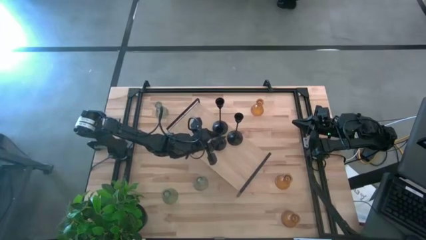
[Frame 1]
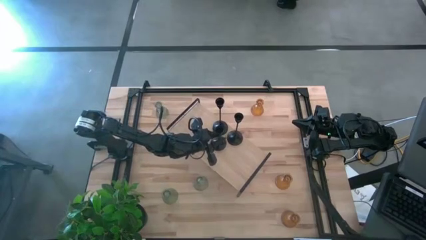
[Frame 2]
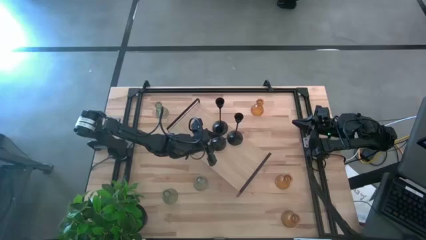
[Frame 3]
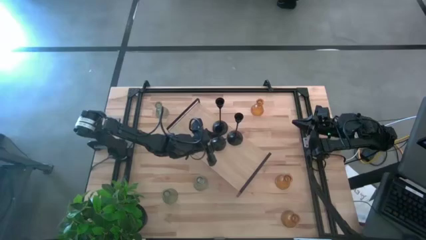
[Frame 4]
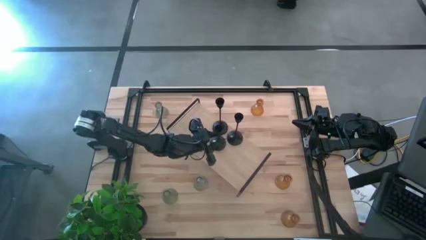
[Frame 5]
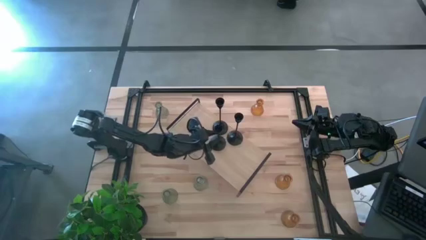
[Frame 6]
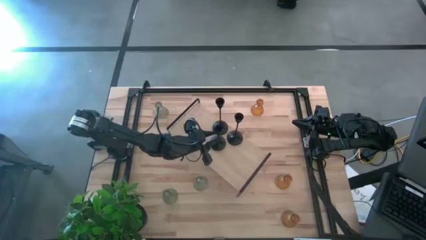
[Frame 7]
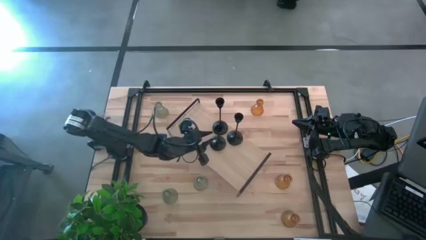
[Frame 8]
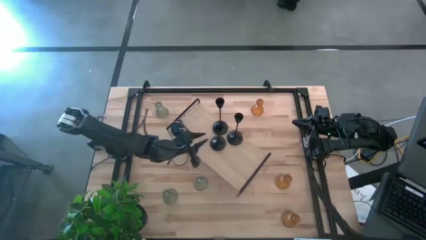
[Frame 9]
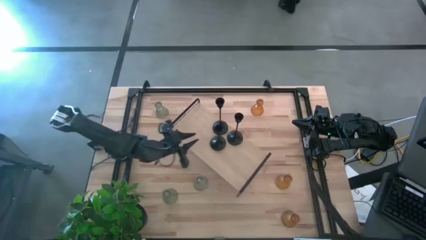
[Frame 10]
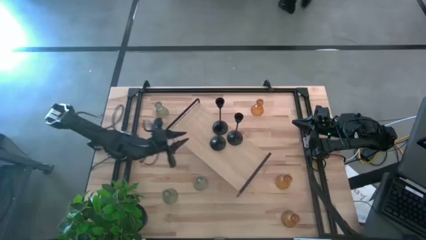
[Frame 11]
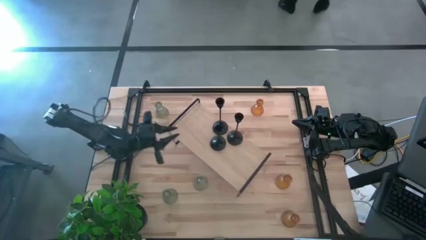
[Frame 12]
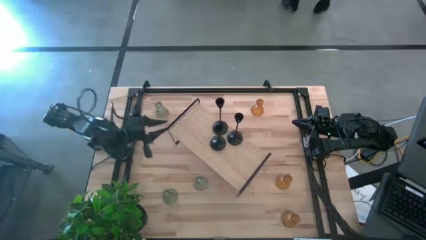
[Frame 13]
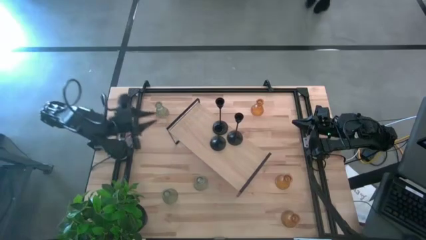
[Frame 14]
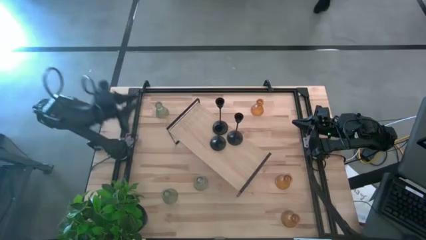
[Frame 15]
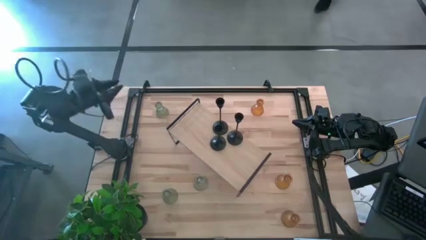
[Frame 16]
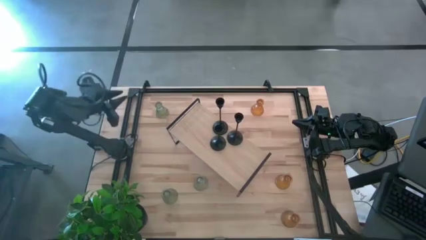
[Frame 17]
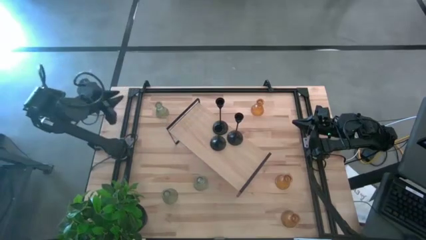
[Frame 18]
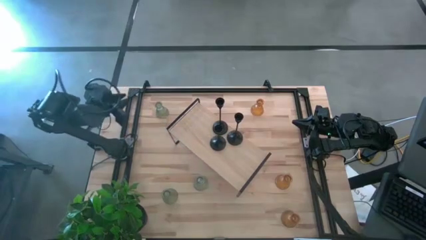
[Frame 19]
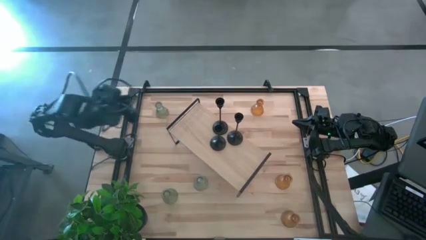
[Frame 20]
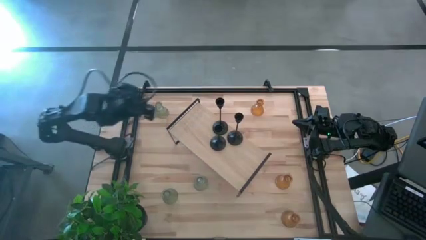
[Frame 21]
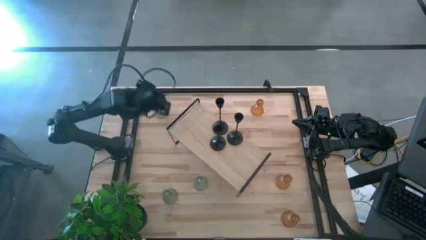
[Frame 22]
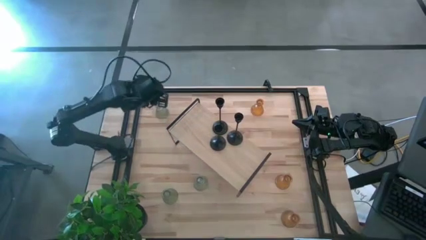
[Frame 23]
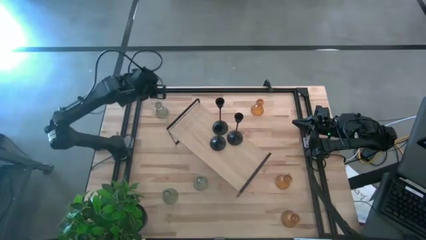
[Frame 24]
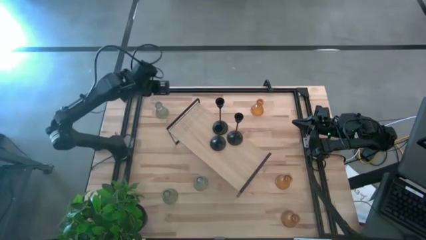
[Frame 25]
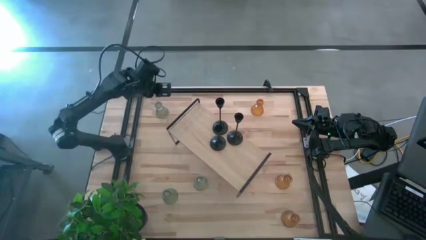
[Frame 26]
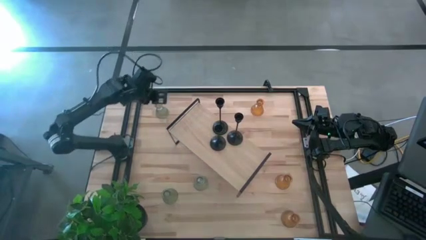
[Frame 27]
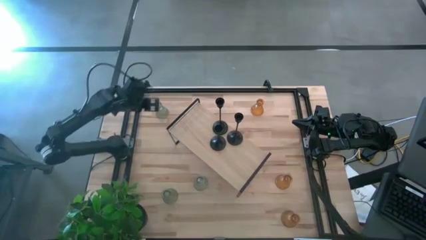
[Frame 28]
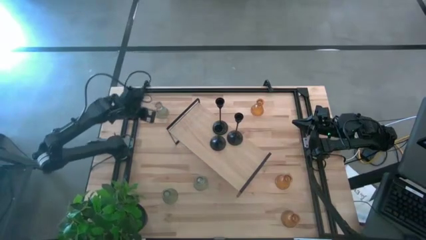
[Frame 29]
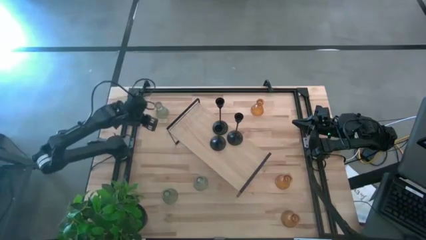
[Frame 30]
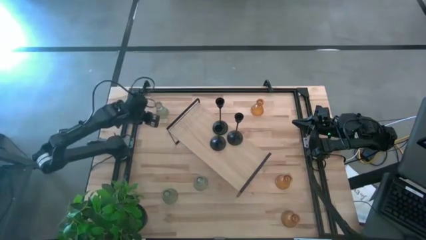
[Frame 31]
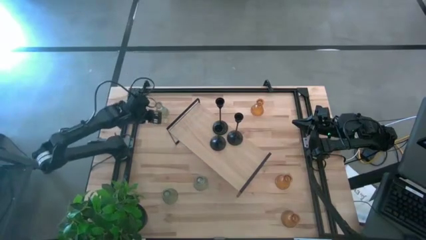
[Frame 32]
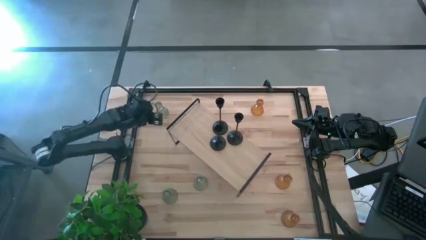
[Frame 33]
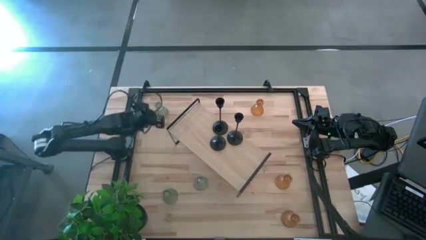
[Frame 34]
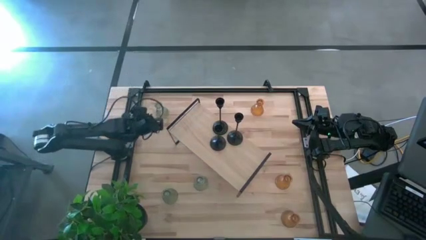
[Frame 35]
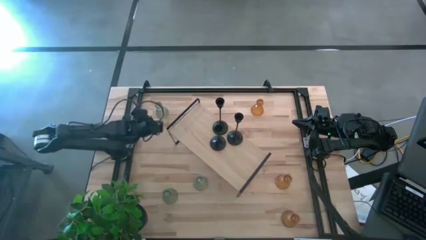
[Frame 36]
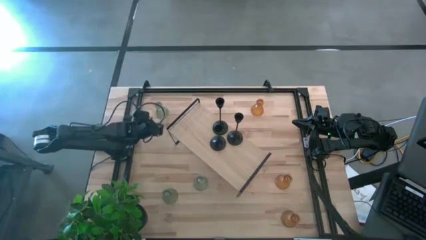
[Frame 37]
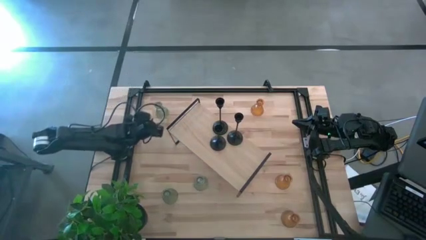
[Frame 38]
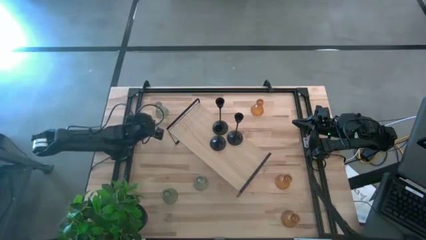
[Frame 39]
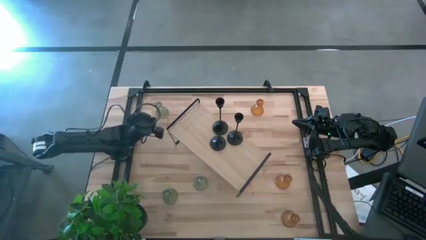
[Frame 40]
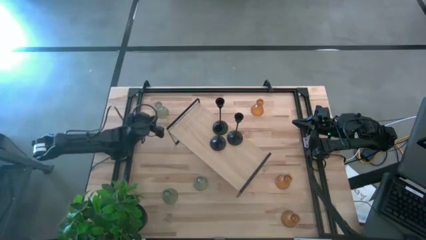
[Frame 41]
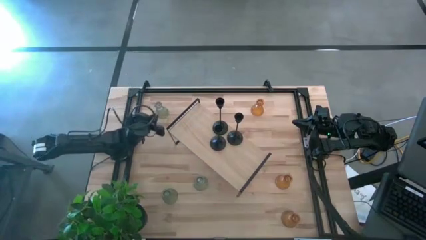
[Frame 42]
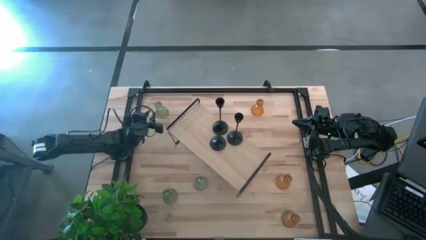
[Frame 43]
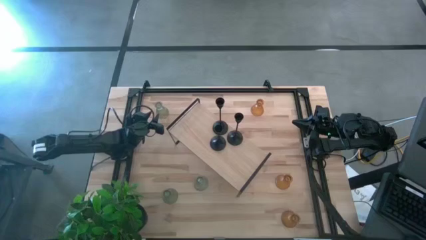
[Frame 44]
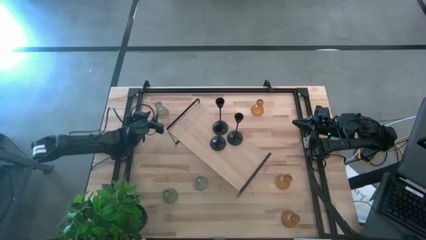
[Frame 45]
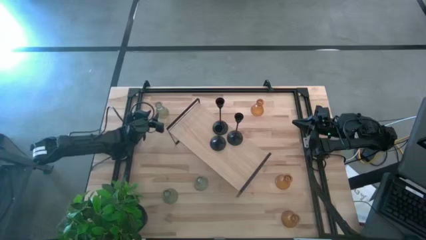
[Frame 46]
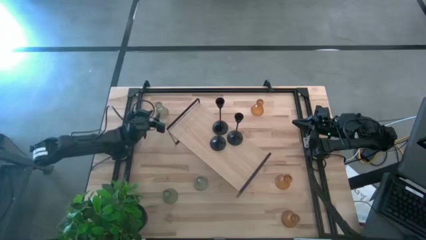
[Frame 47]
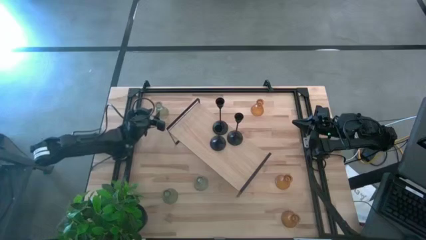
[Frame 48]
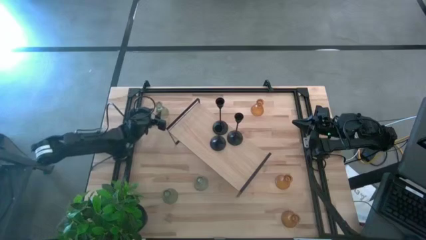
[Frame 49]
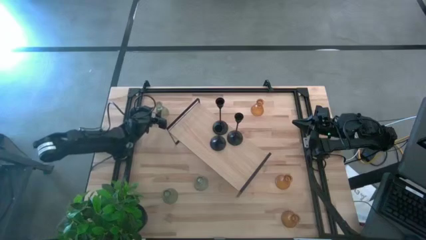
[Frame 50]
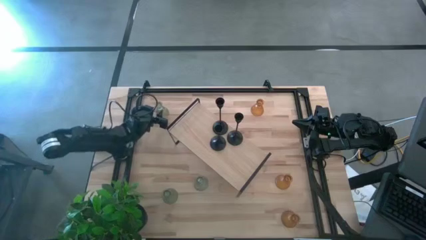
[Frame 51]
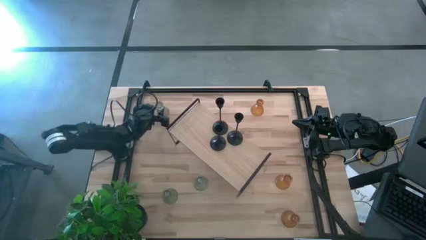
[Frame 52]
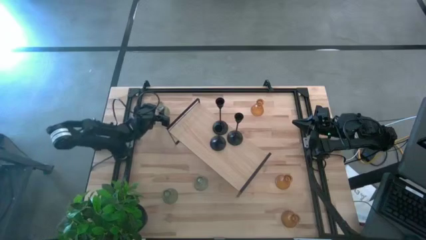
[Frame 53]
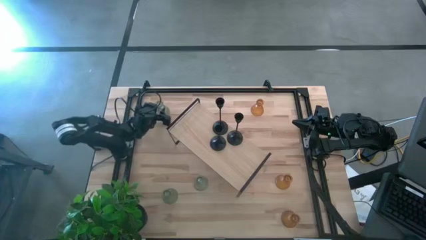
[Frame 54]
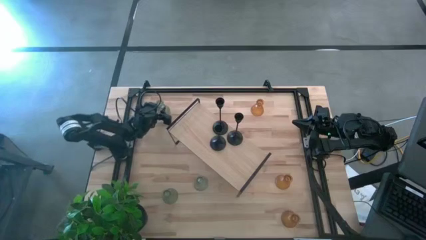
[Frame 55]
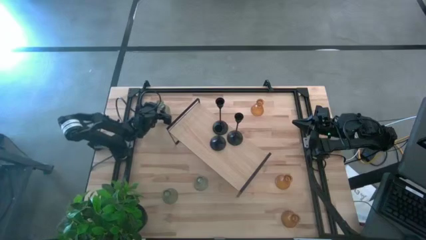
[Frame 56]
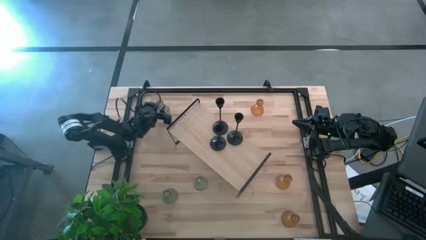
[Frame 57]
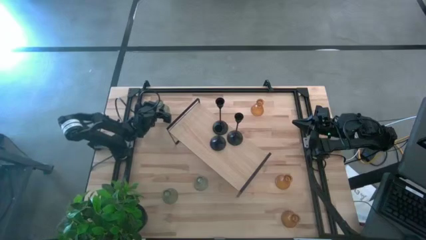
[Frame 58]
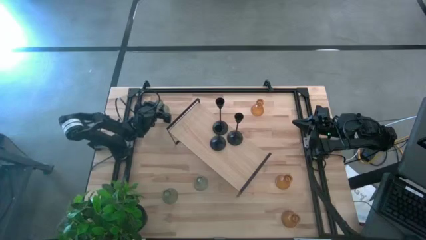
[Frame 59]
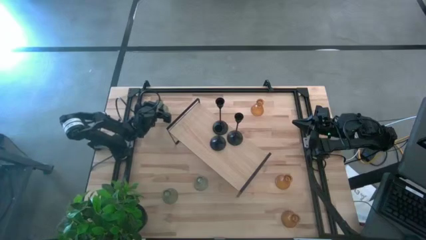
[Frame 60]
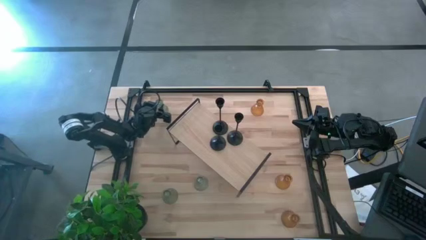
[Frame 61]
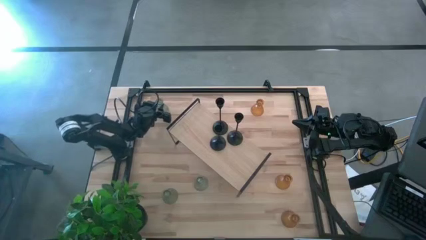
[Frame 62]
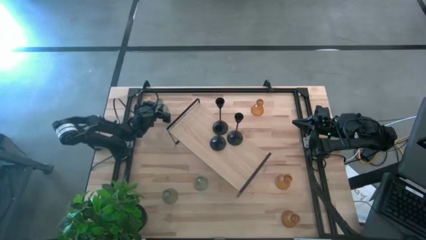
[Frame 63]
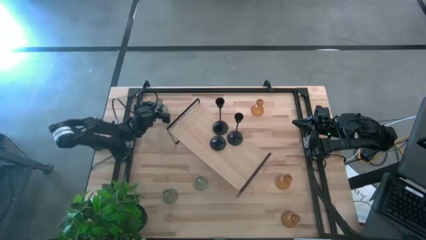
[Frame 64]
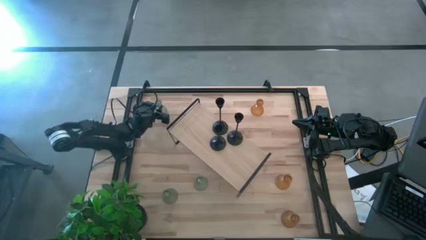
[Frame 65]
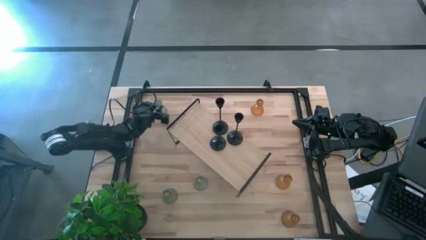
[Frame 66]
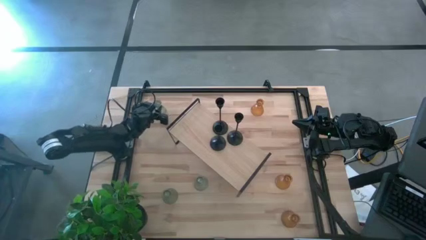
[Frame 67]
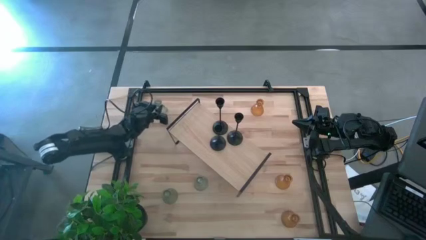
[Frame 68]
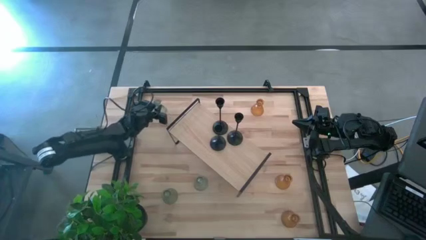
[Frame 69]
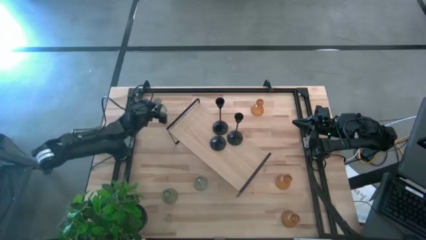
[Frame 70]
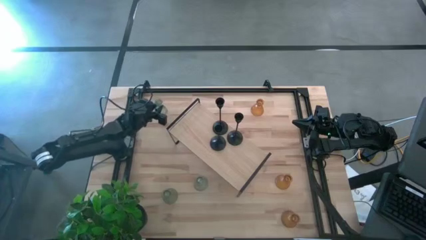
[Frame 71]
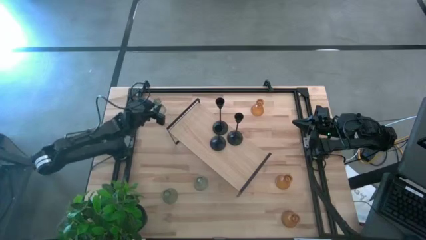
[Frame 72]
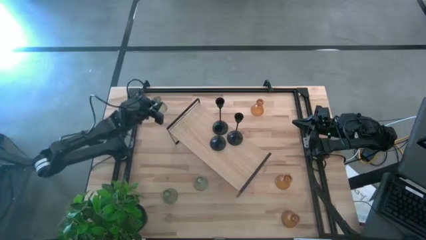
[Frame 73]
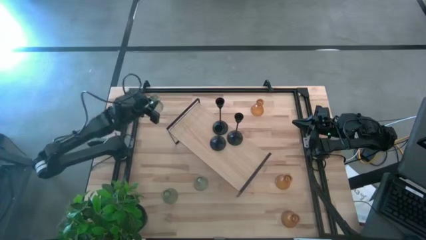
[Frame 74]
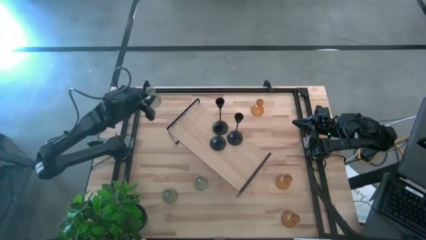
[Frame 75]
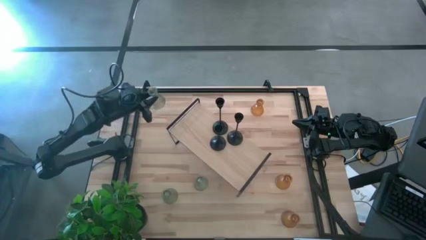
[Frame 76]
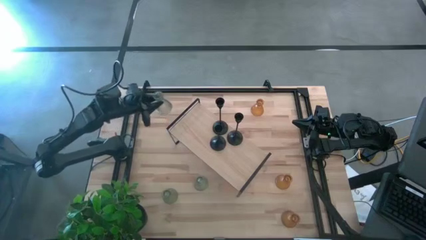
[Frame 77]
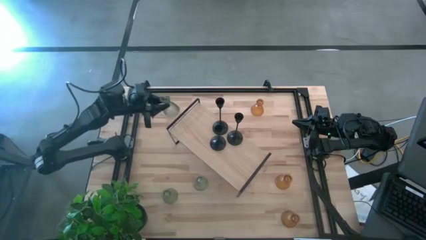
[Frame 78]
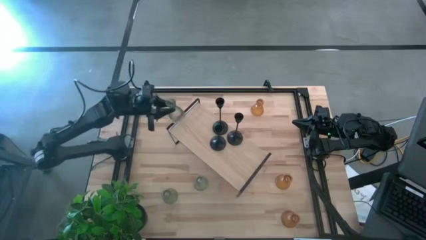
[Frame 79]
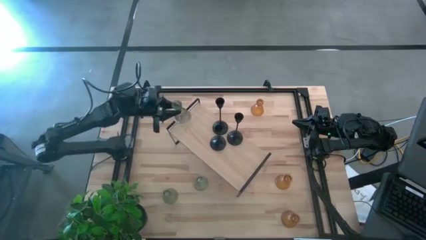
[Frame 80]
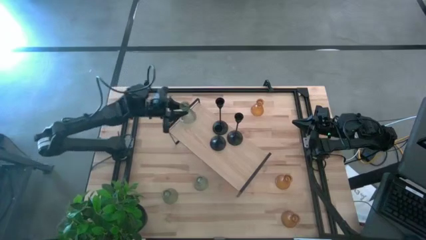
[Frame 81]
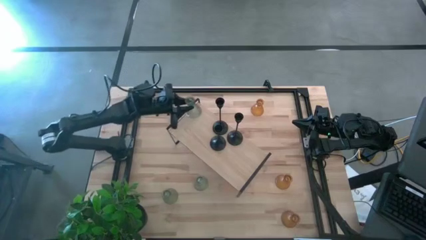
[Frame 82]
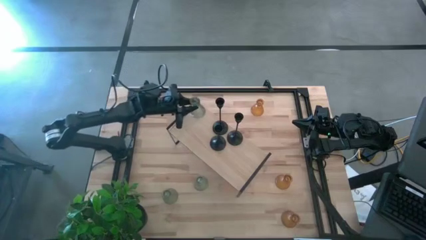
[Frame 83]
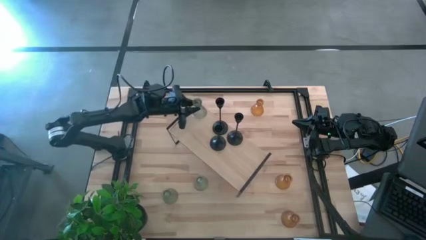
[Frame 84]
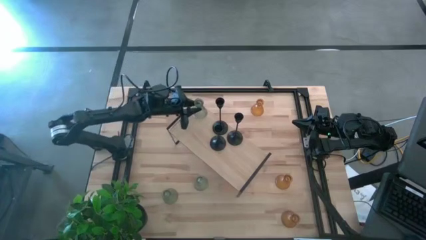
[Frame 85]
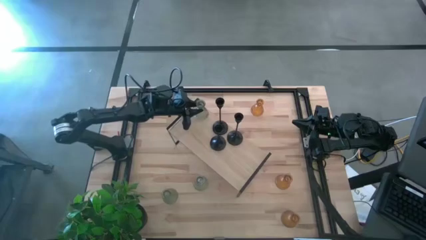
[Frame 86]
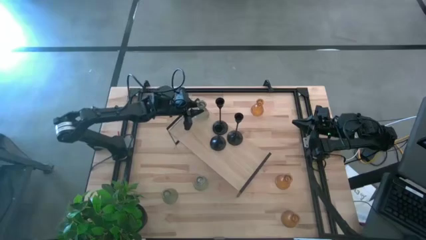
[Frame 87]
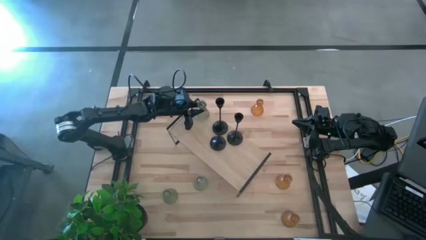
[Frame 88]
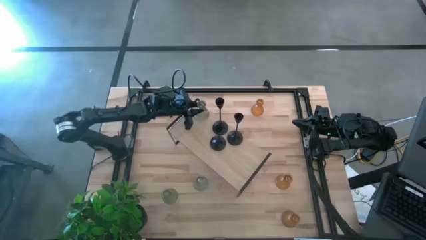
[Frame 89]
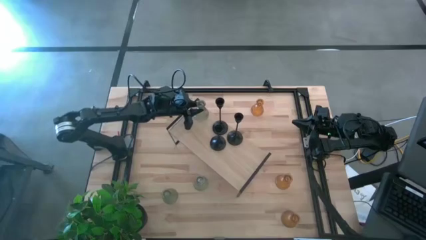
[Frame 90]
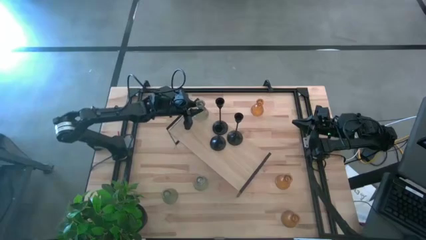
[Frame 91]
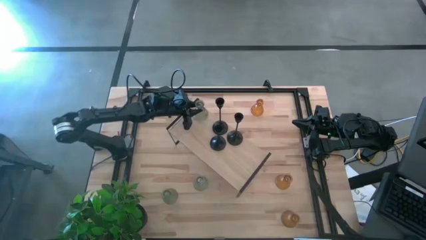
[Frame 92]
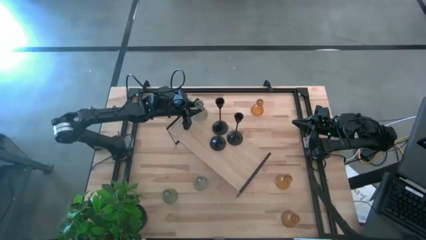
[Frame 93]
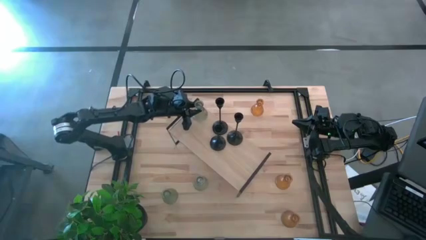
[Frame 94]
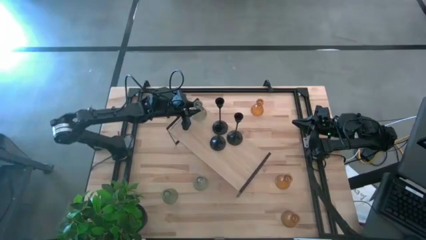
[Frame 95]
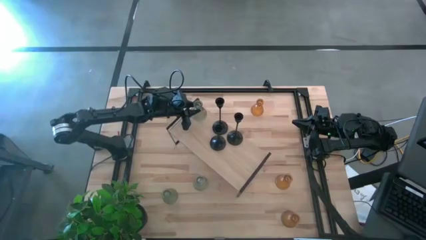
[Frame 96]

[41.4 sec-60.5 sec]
Task: Pick & Place candle stick holders
Put the top left transparent candle holder on the shelf
